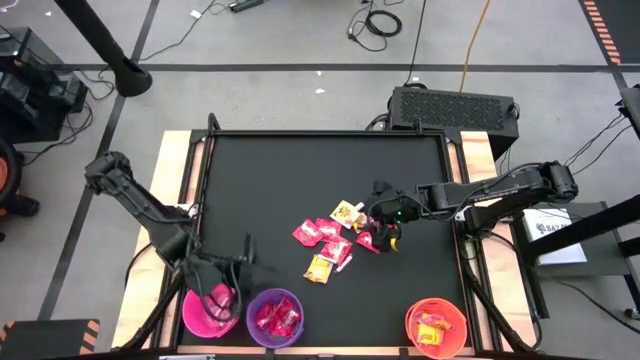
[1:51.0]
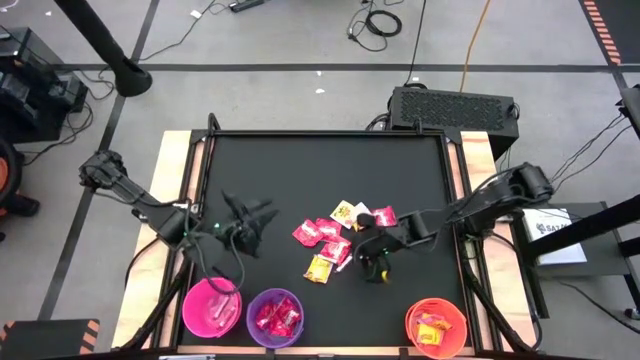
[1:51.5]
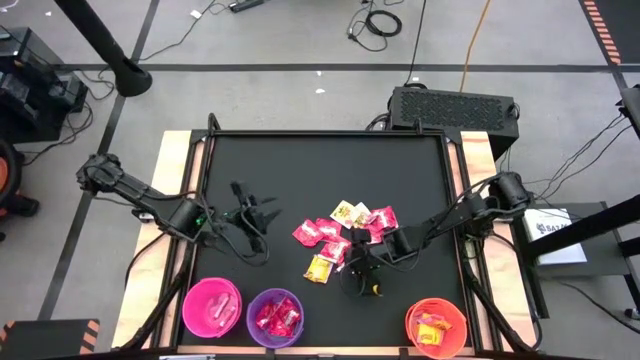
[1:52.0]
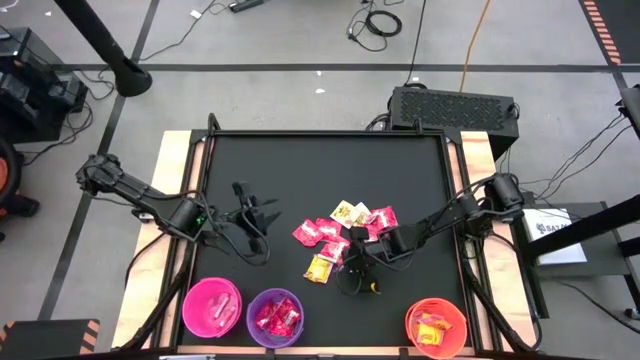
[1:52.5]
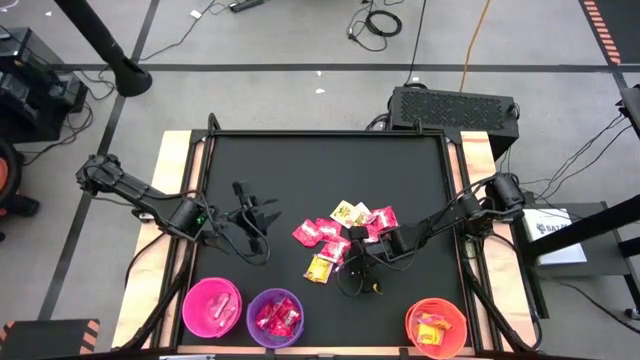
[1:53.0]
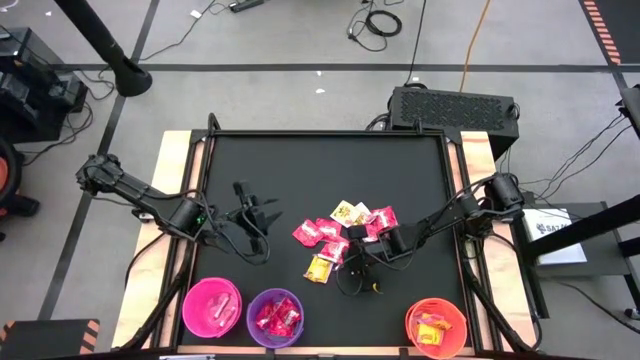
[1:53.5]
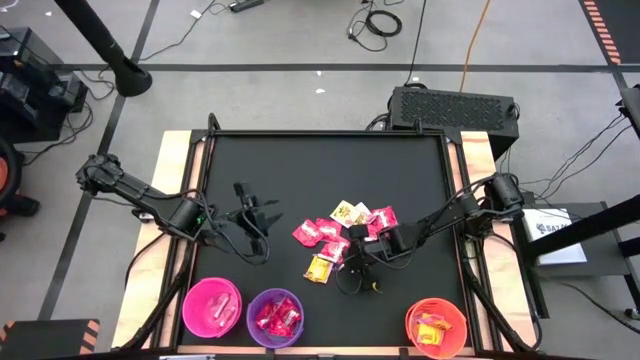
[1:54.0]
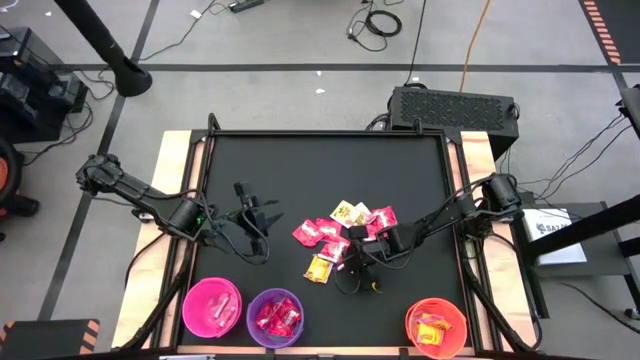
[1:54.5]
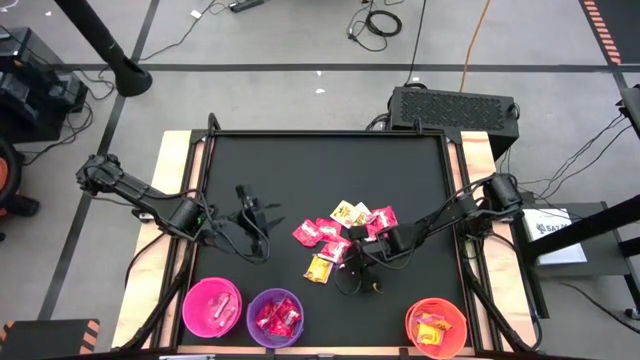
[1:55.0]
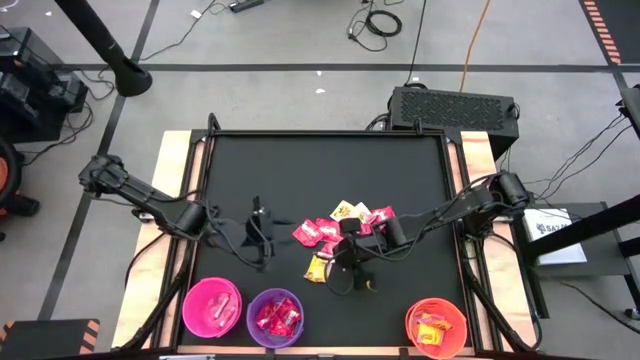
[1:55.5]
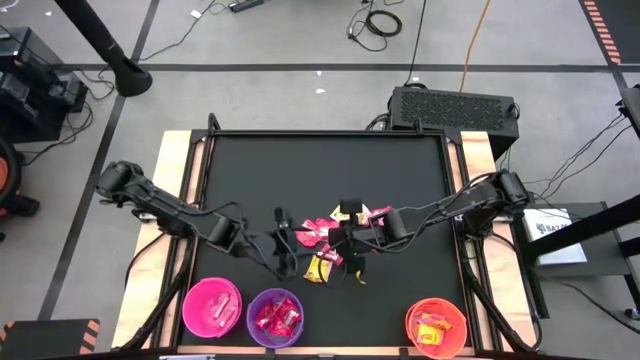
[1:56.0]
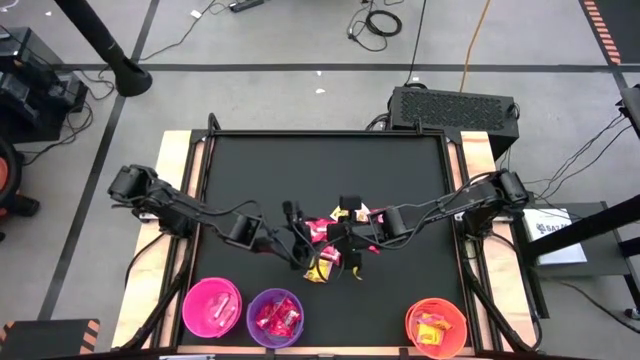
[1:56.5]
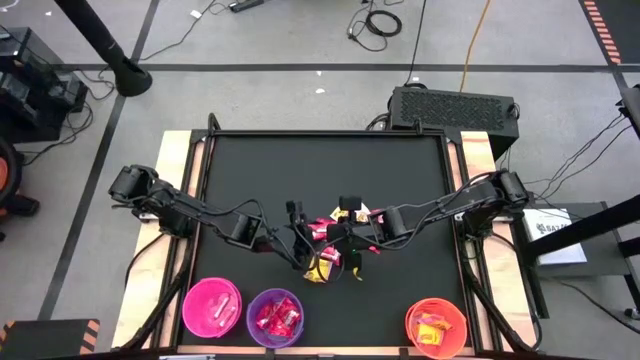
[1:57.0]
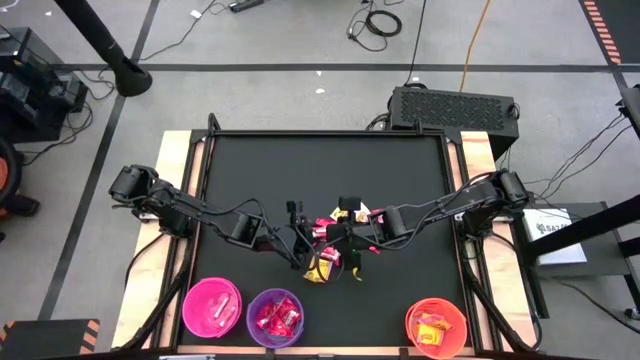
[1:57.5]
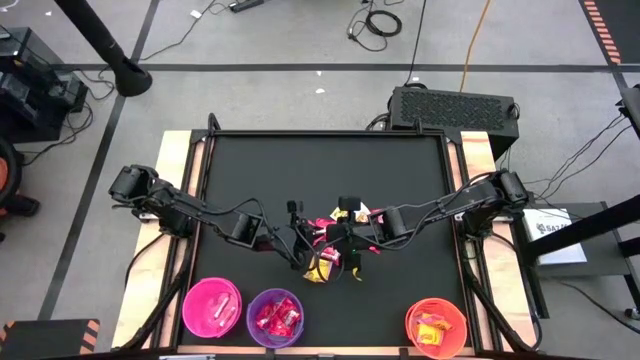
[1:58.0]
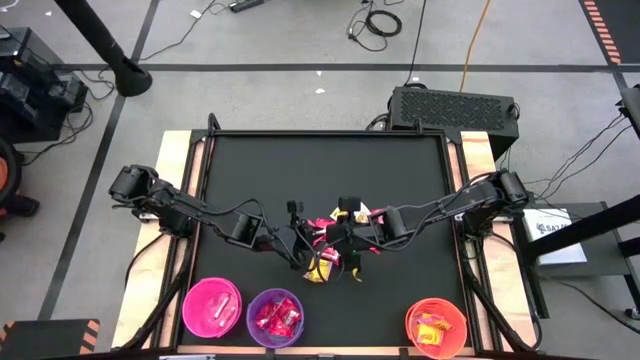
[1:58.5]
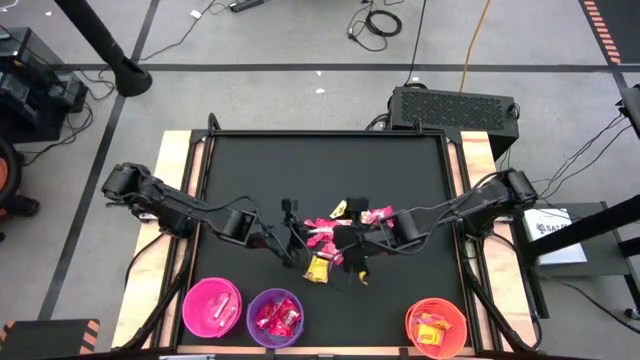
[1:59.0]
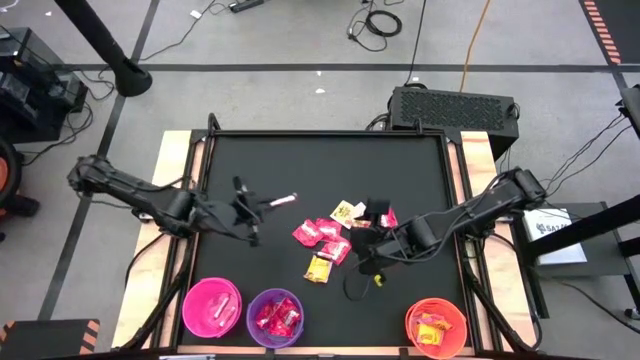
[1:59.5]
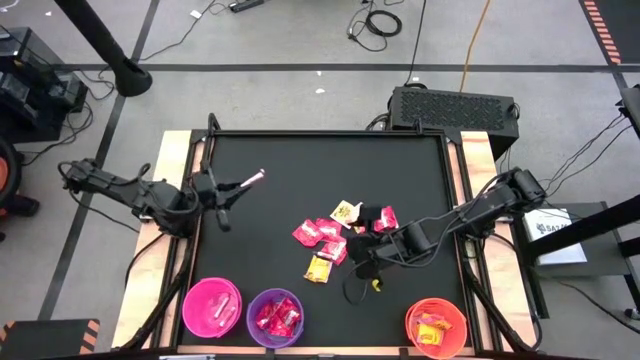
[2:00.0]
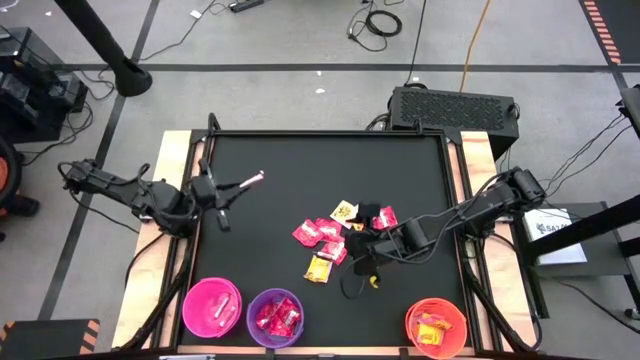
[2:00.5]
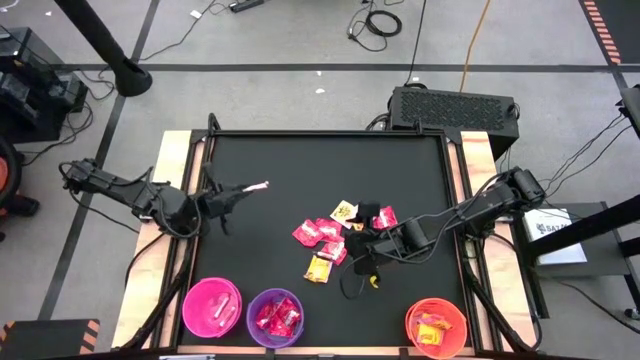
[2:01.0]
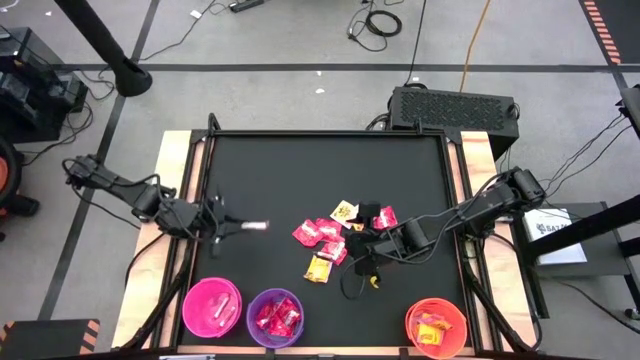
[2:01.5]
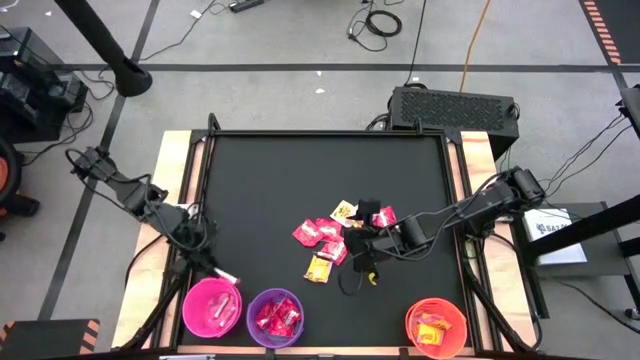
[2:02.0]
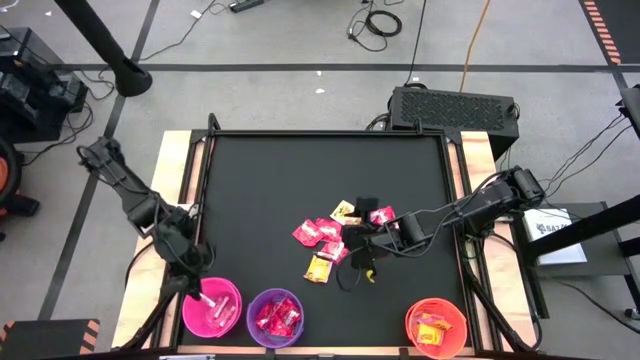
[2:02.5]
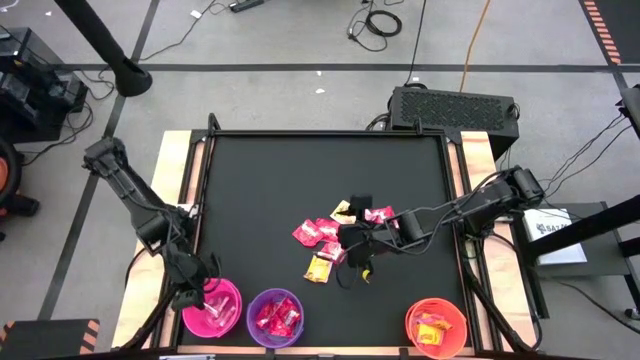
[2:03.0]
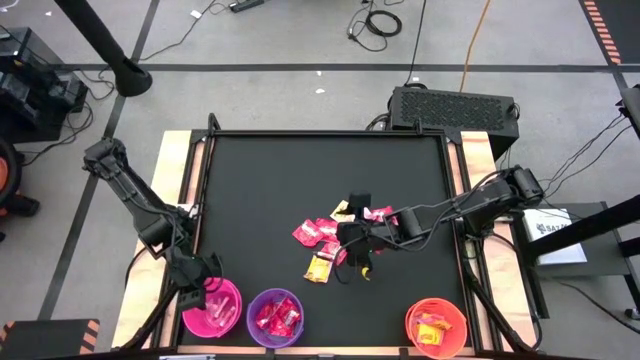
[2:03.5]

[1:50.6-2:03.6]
Task: Sort candy by brand, put in halloween buckets
Put the orange candy into the pink bucket

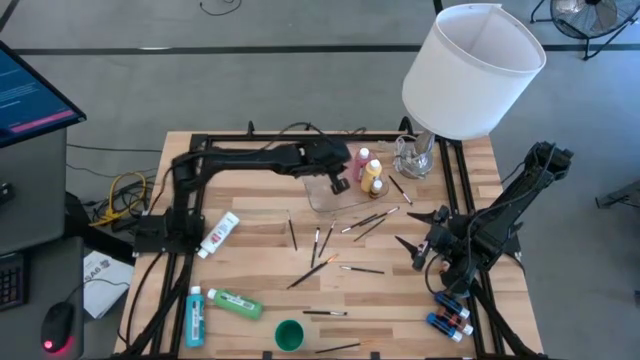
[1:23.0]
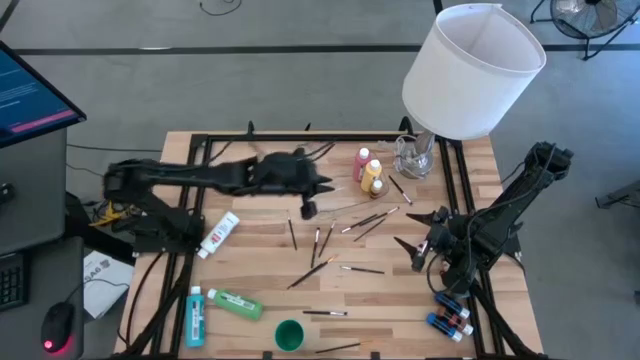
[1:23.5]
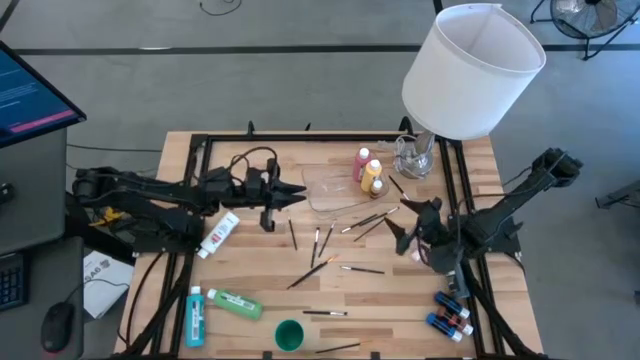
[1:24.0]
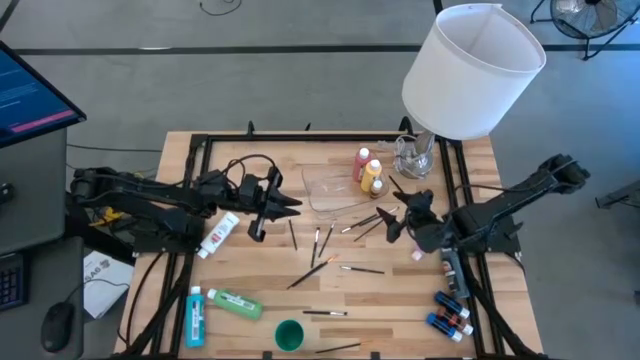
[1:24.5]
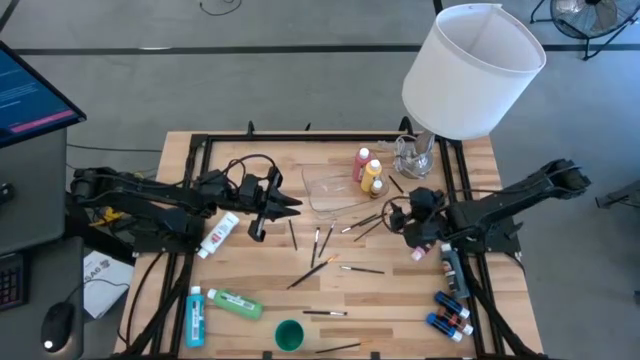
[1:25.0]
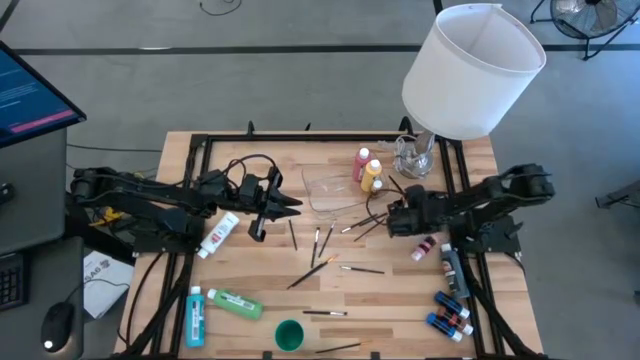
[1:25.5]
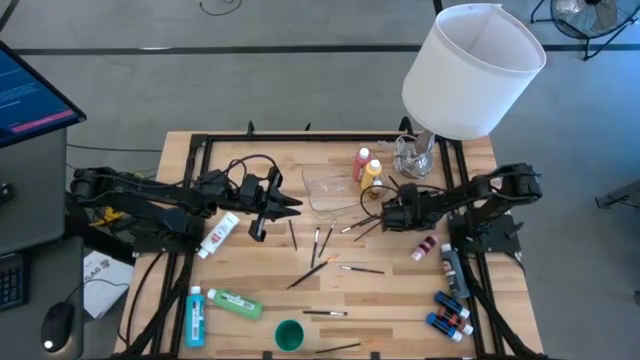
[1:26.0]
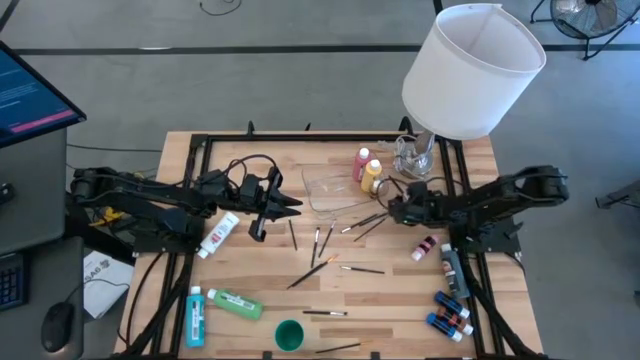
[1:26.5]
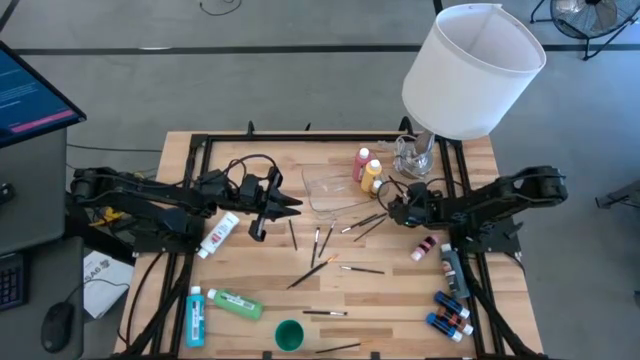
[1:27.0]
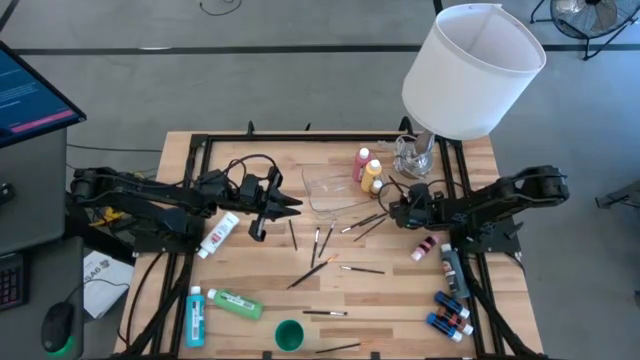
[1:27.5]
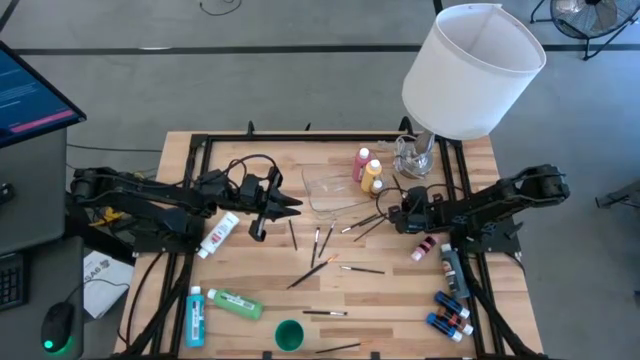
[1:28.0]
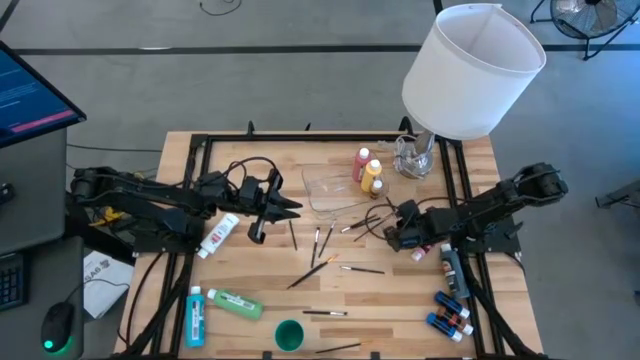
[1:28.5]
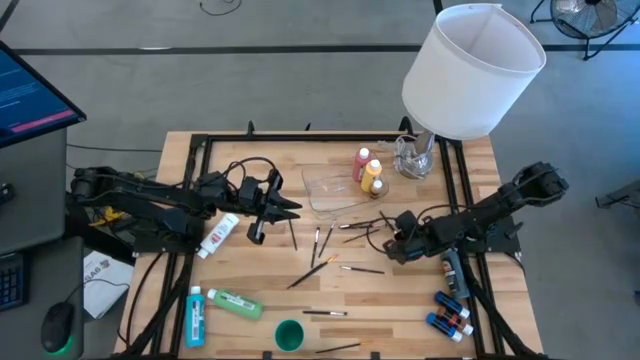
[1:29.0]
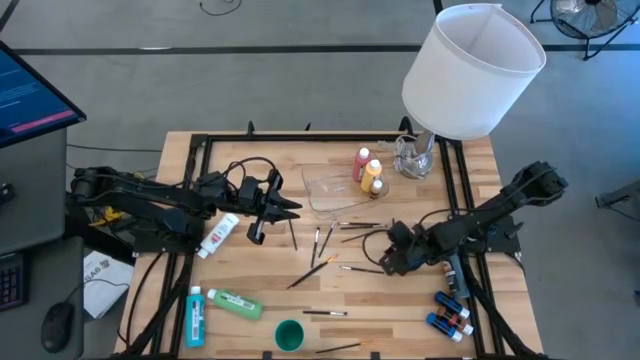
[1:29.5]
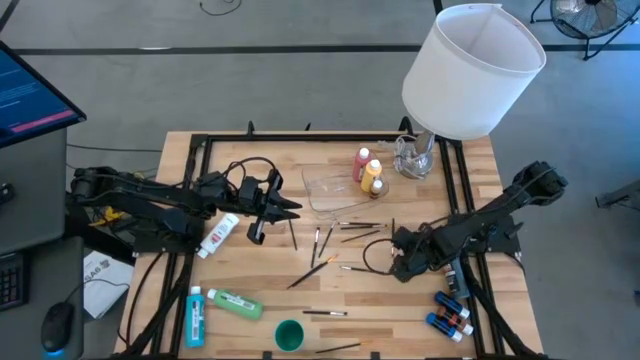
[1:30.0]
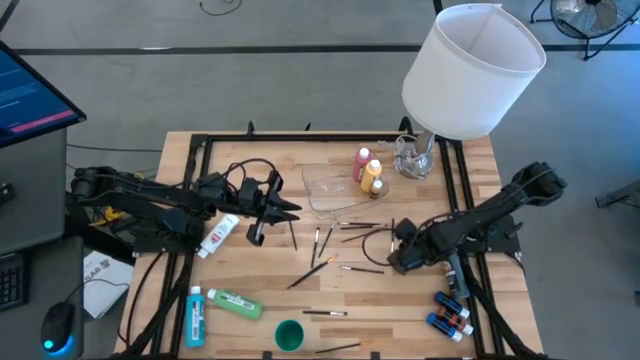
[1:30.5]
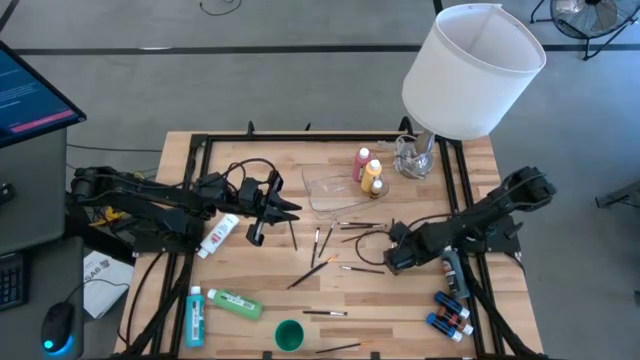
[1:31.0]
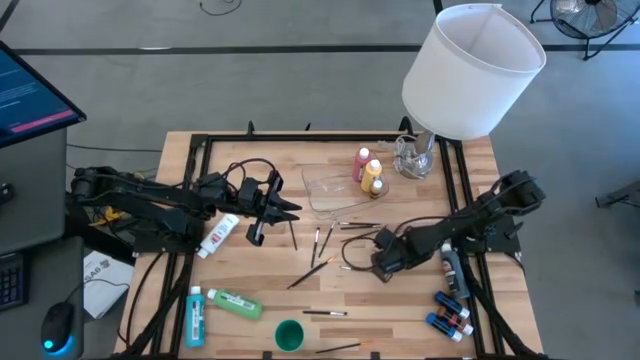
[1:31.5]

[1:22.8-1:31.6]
Task: Pick & Place Paint Supplies
Put the silver paintbrush into the green cup
